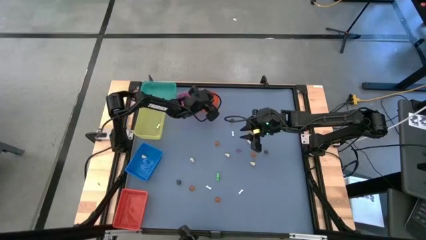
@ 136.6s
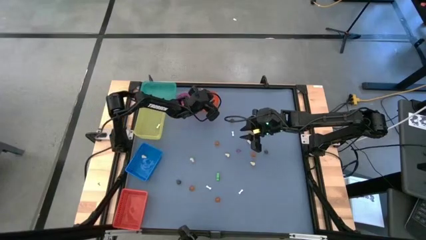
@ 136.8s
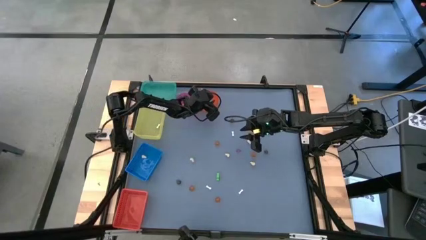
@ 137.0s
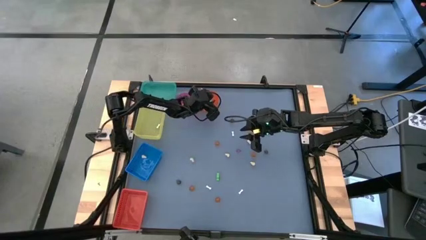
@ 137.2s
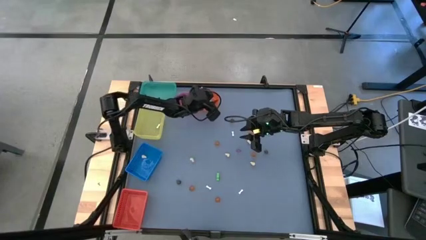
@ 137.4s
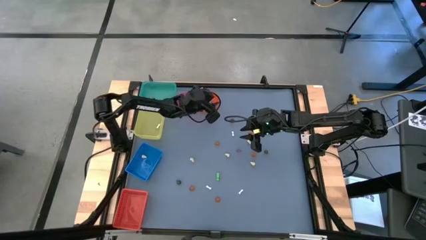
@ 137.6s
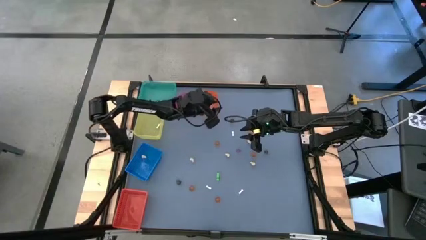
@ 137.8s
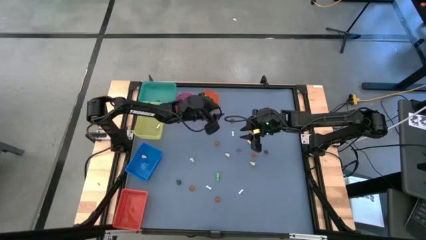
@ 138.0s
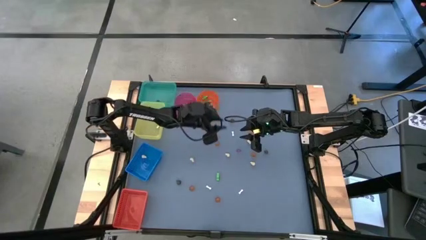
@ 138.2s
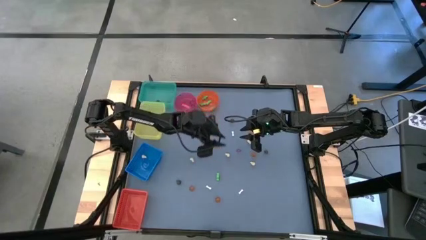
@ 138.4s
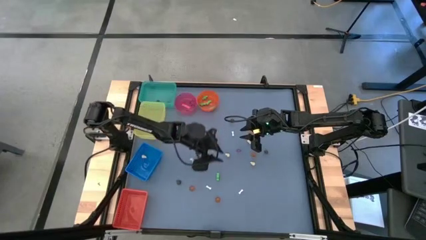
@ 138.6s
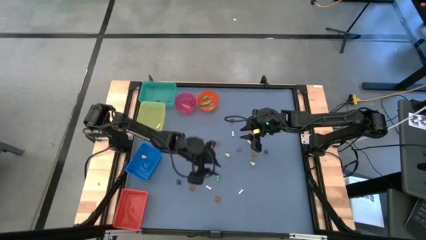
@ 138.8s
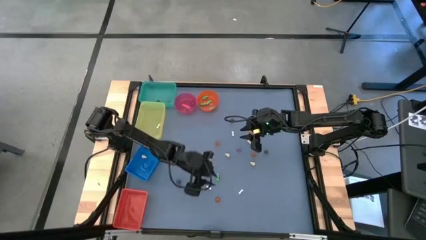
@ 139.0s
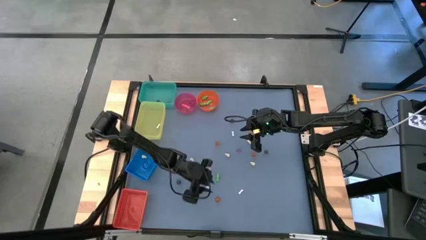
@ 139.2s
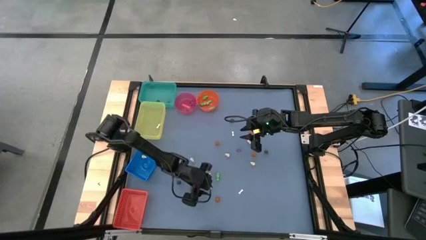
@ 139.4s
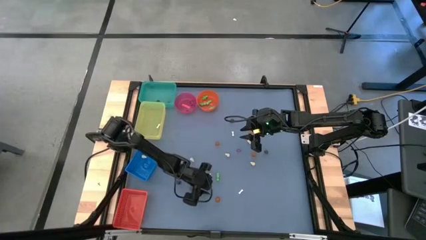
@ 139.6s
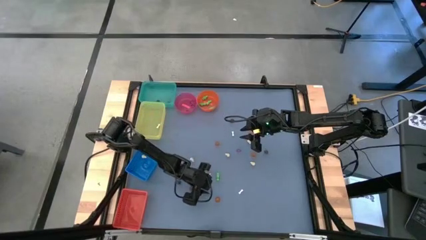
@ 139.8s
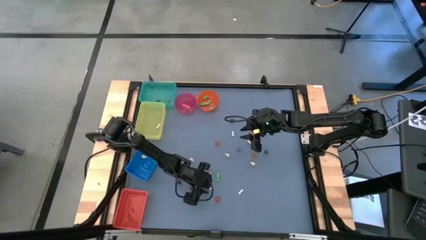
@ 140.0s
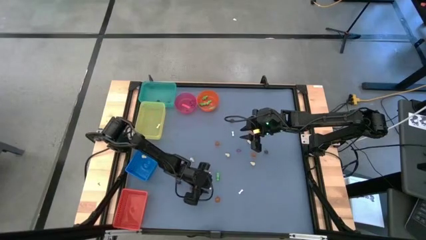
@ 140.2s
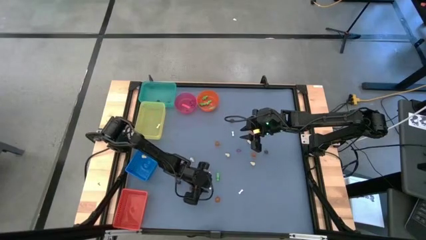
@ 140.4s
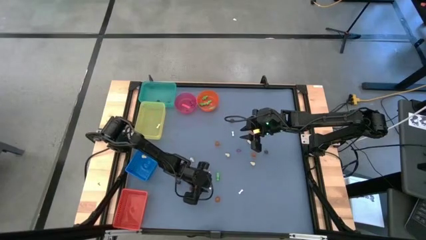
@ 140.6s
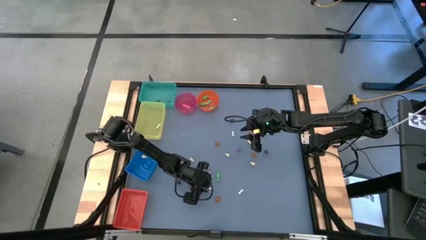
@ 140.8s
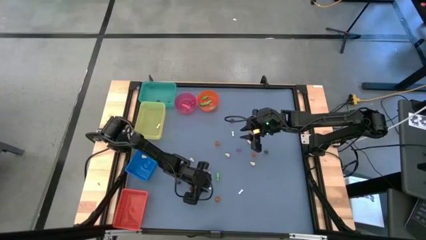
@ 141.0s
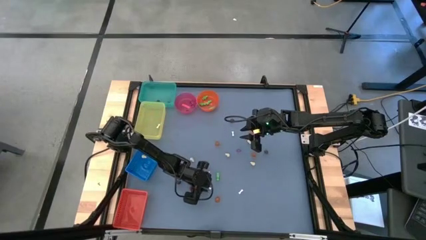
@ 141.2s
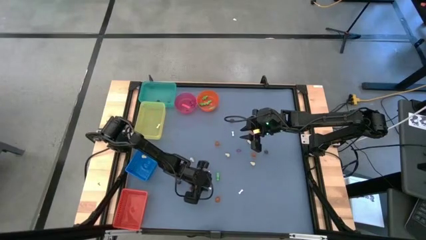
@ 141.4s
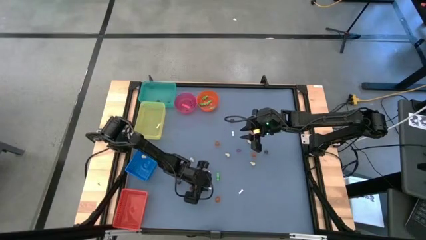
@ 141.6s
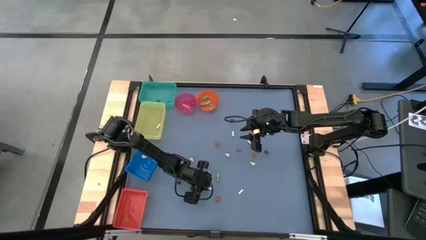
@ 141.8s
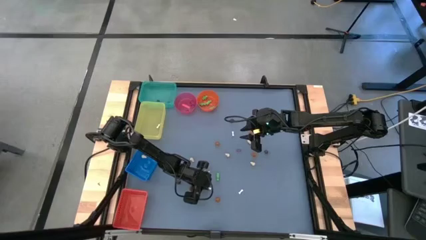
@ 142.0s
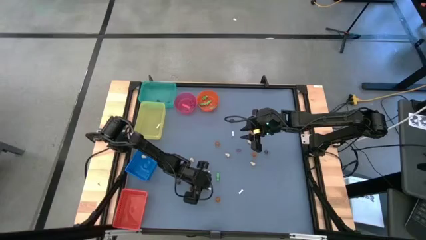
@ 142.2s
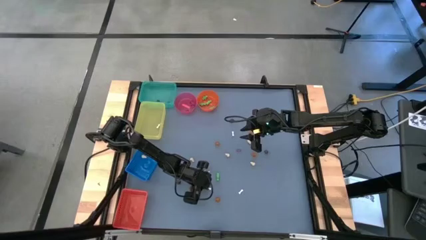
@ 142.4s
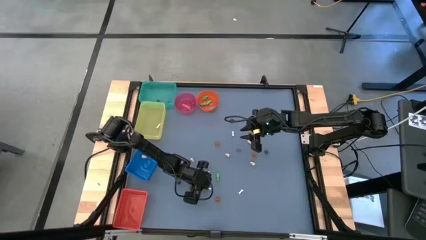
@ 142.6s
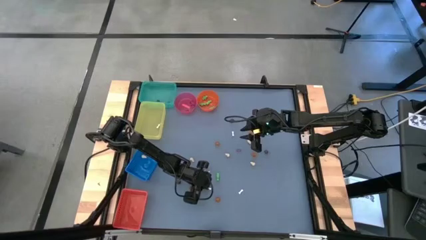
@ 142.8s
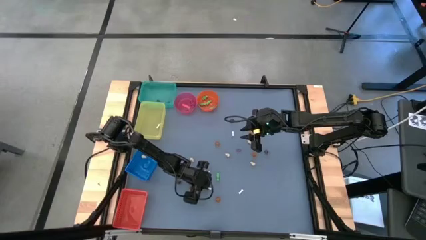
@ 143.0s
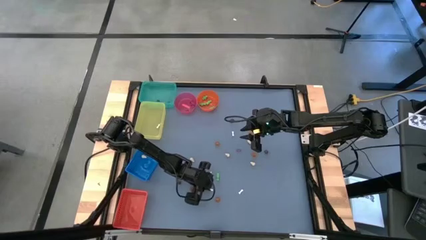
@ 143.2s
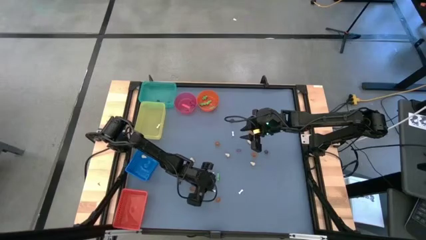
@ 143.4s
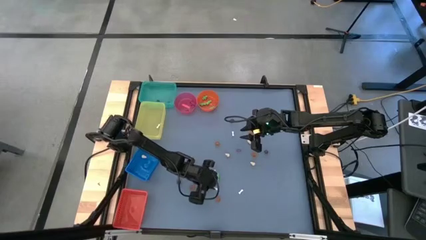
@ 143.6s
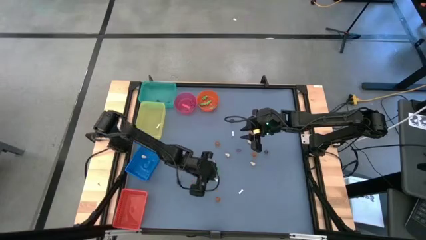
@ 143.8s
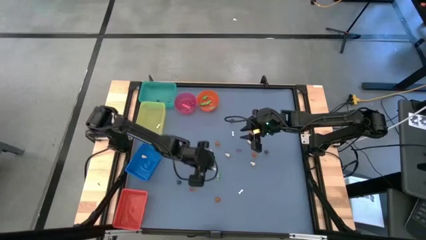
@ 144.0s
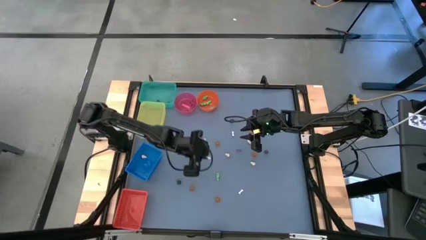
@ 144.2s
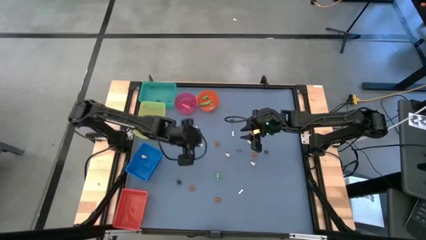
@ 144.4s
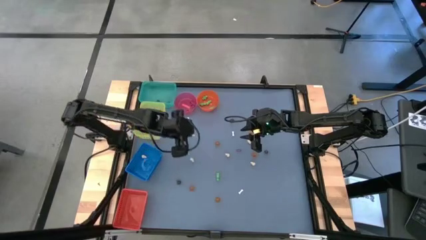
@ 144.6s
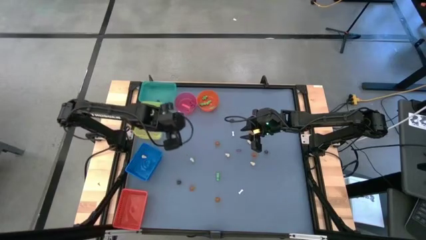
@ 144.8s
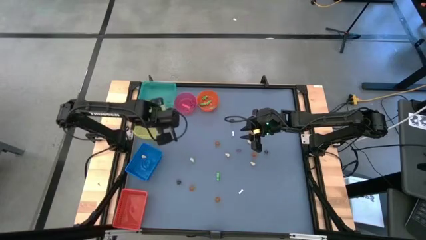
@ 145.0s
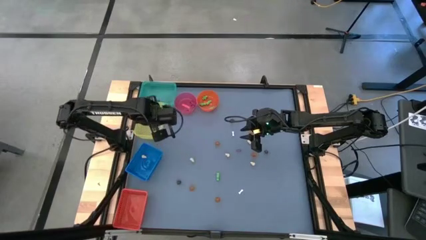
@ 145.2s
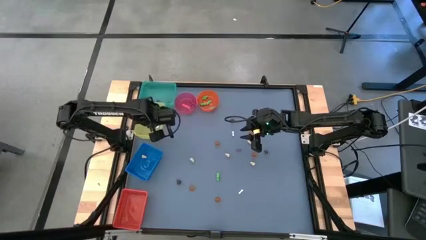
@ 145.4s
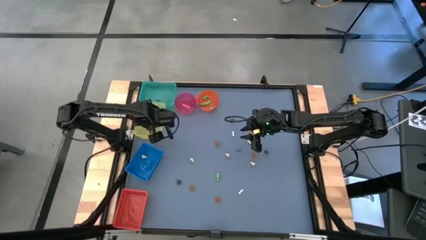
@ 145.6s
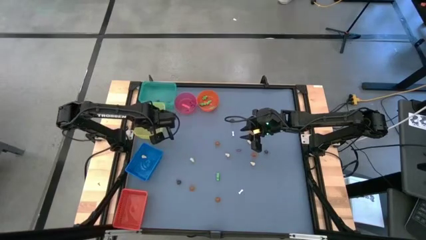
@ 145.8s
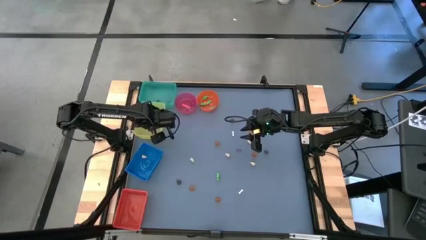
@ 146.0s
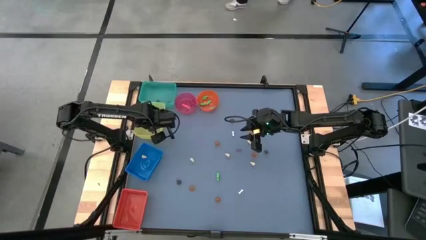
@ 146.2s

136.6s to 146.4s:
Task: Sort Halloween decoration
Put the white bone toy into the yellow bin

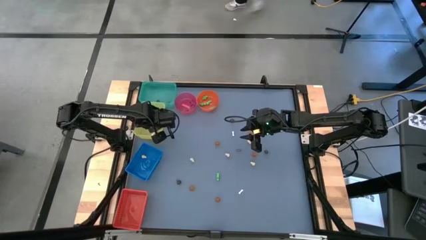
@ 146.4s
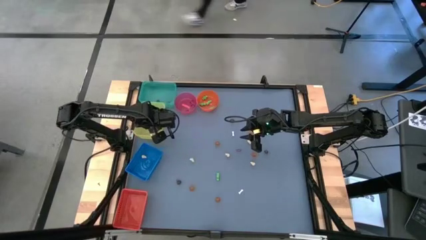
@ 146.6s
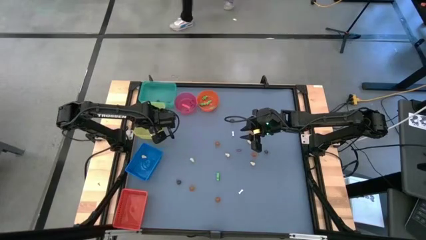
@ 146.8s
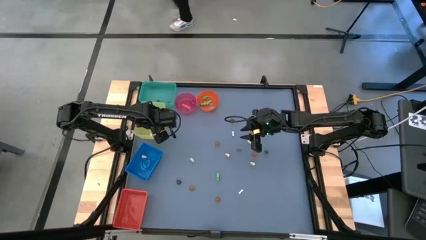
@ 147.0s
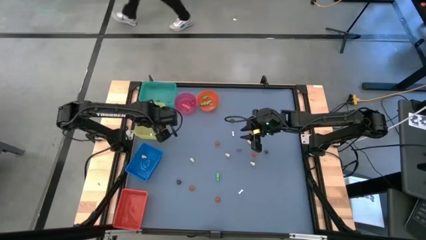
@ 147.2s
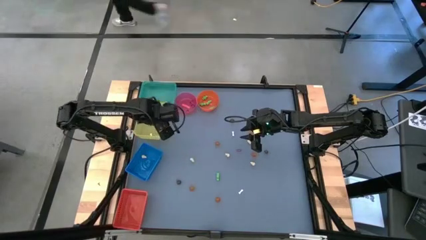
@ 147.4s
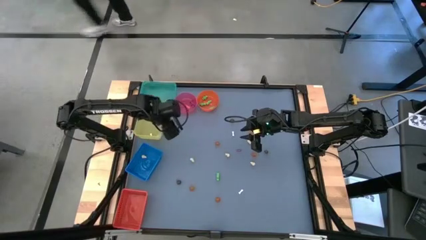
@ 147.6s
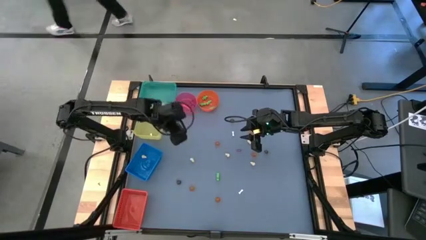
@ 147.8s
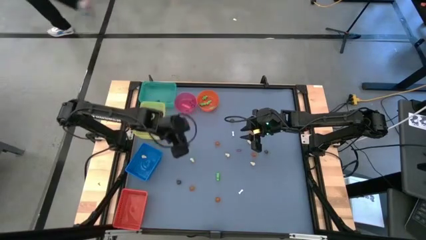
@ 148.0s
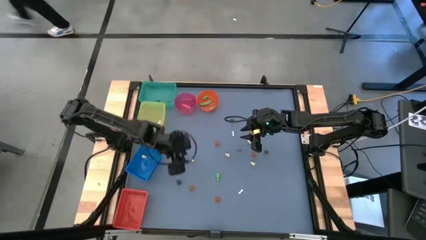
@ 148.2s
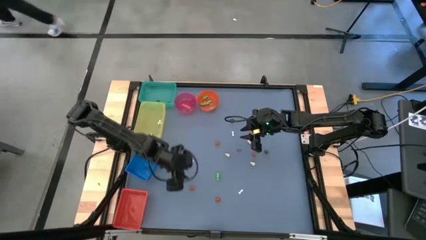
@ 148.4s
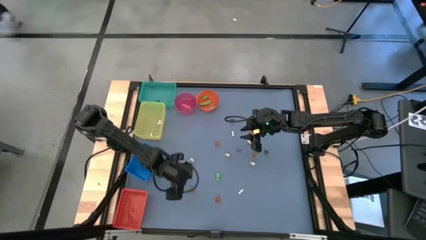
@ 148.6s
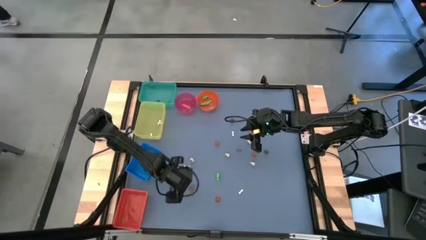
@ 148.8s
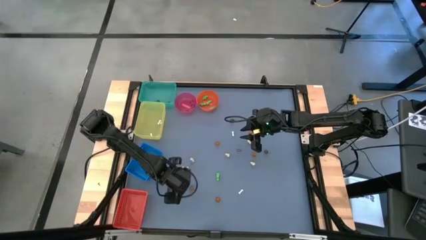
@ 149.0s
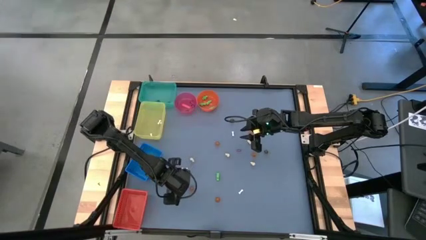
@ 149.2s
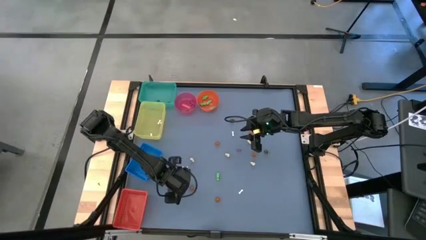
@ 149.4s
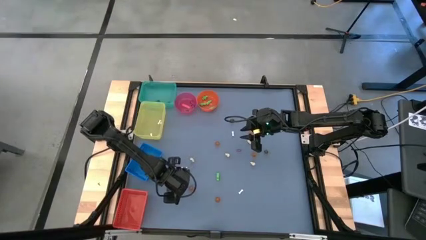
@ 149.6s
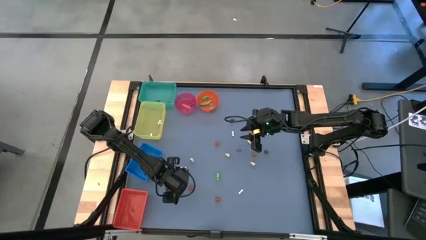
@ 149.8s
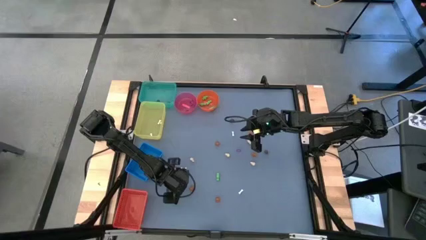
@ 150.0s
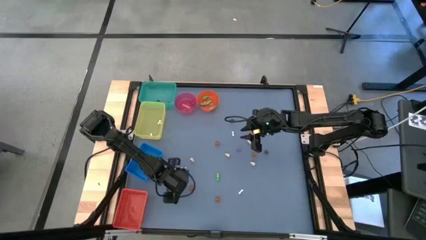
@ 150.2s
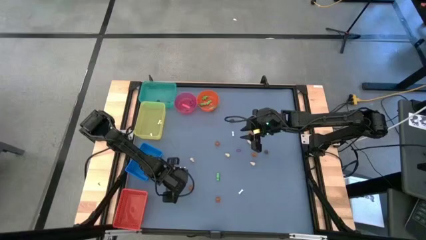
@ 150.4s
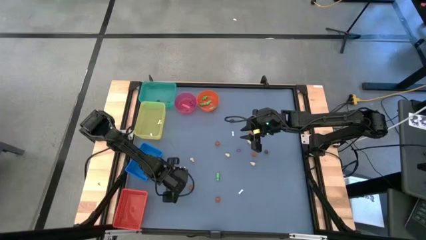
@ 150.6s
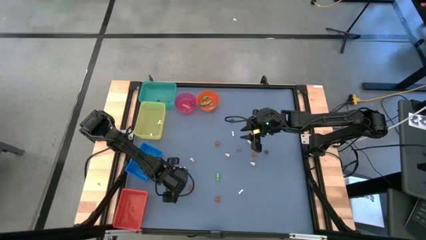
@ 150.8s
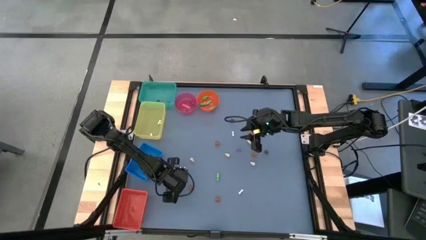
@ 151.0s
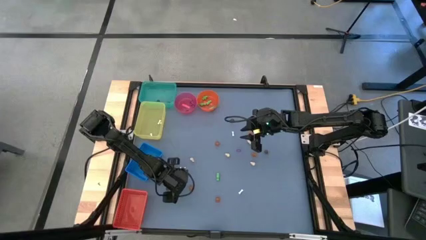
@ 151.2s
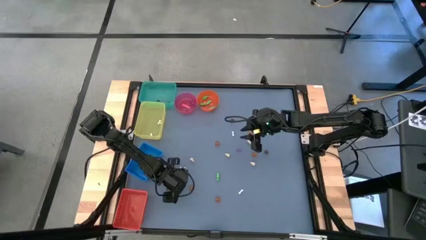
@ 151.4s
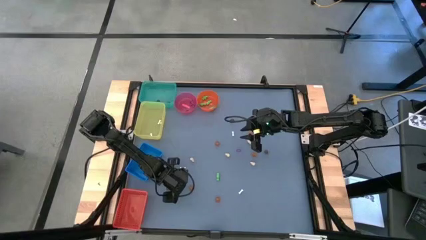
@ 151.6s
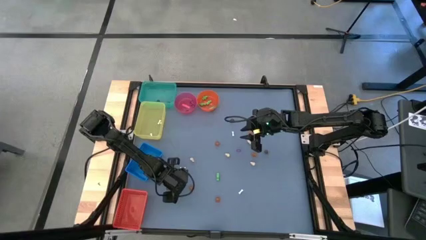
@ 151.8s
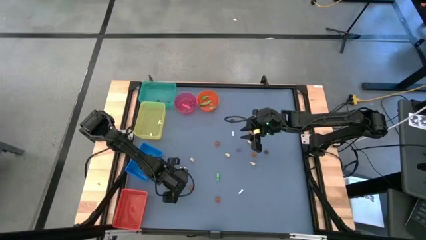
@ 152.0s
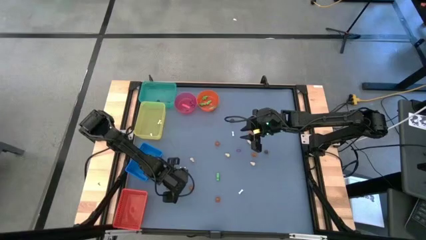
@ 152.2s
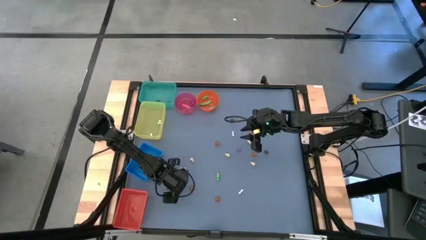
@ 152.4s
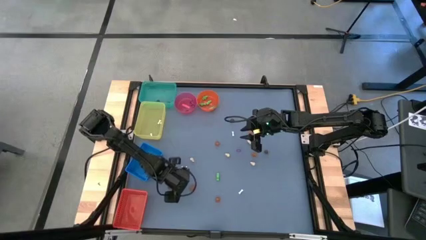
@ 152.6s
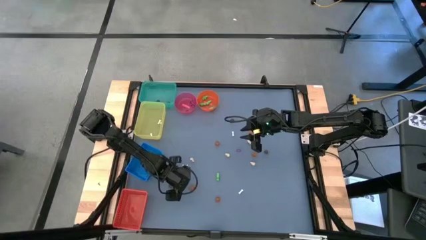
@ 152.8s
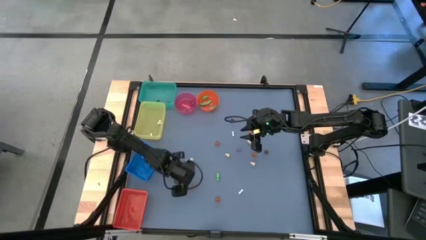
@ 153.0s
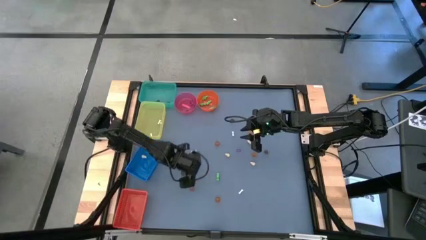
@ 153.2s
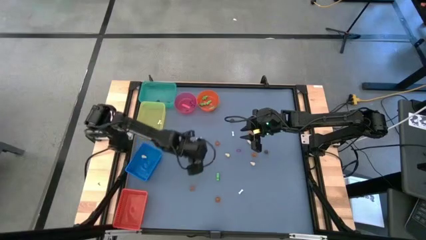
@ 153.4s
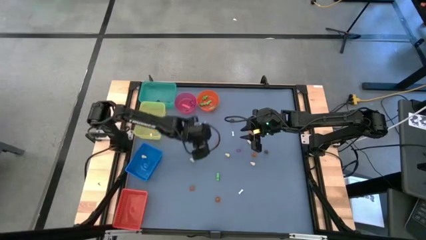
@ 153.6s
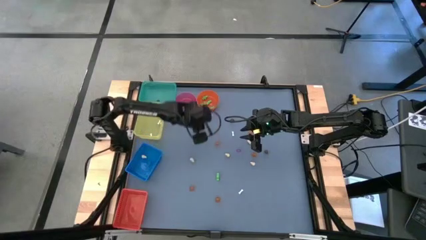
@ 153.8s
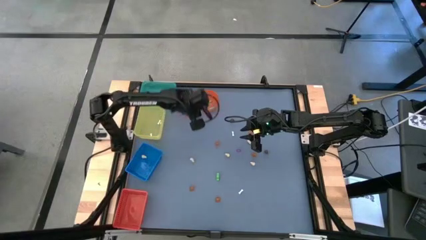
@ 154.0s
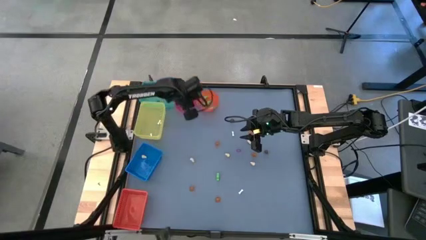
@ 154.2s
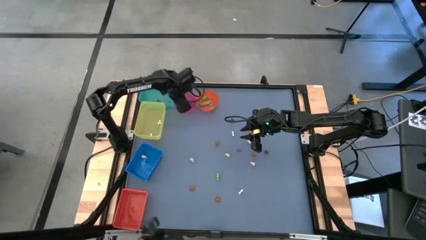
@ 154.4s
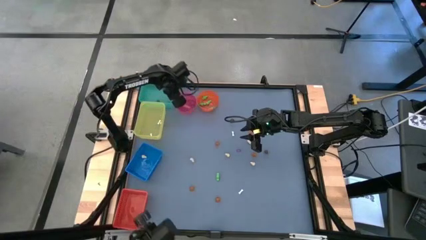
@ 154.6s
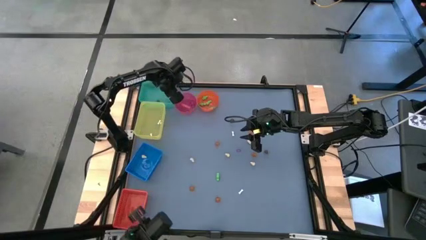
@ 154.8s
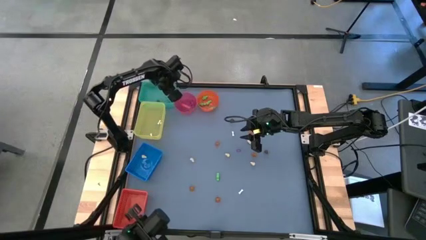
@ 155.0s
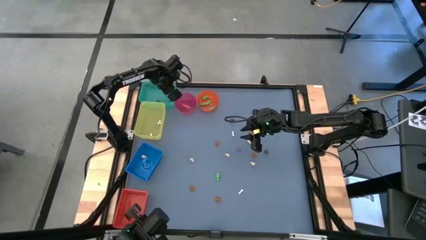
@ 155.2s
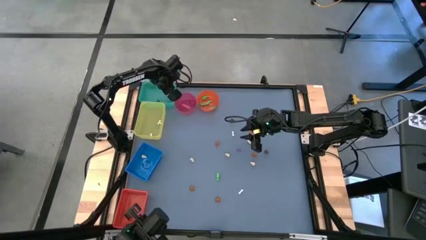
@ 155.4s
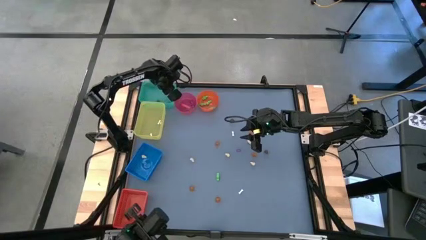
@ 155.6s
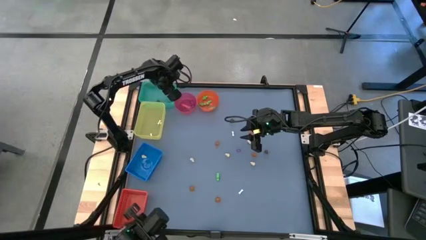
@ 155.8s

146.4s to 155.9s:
Put the black skull toy into the green bin
